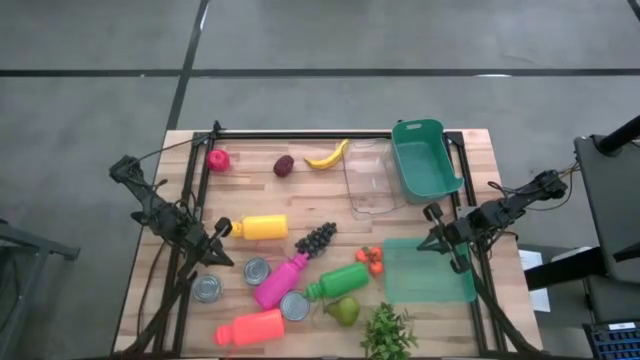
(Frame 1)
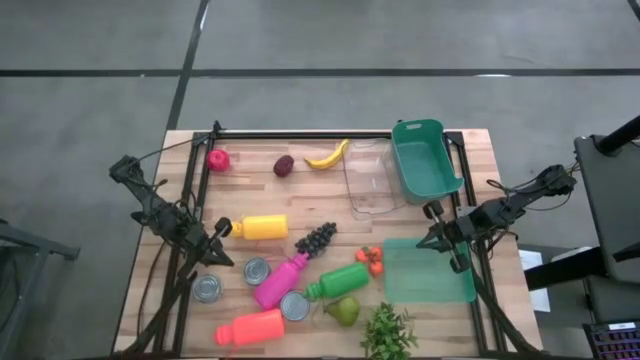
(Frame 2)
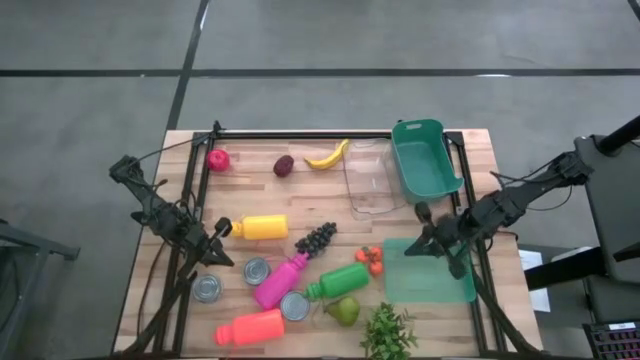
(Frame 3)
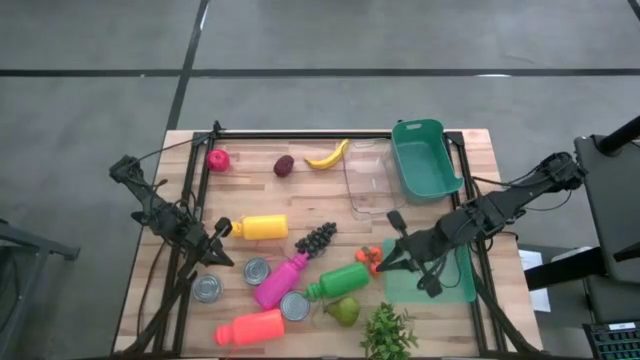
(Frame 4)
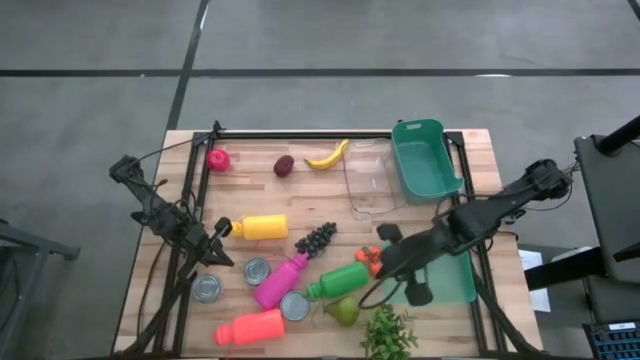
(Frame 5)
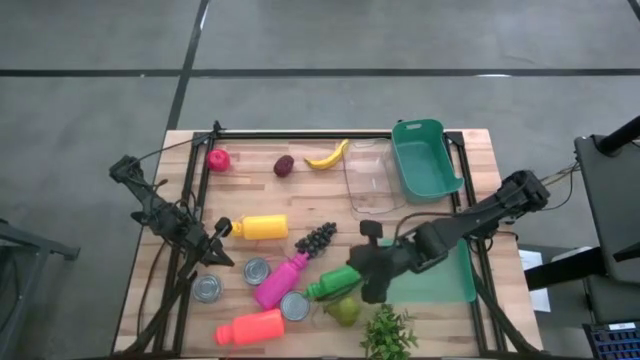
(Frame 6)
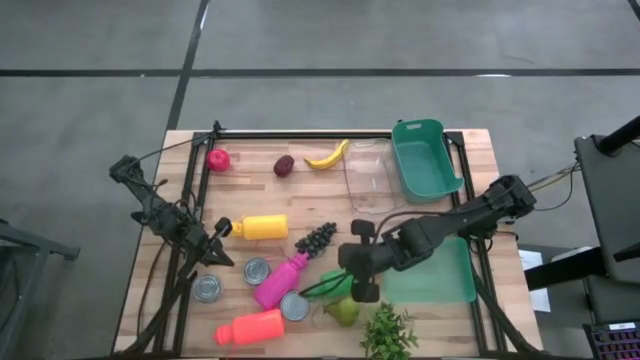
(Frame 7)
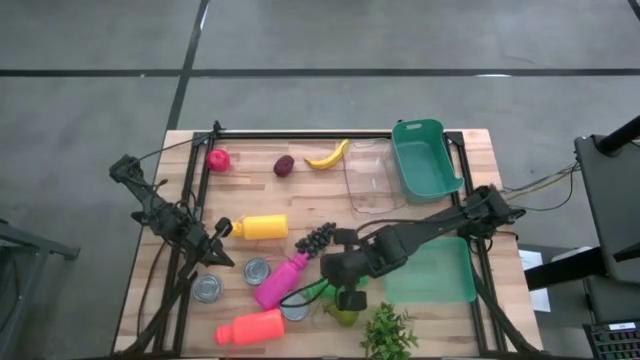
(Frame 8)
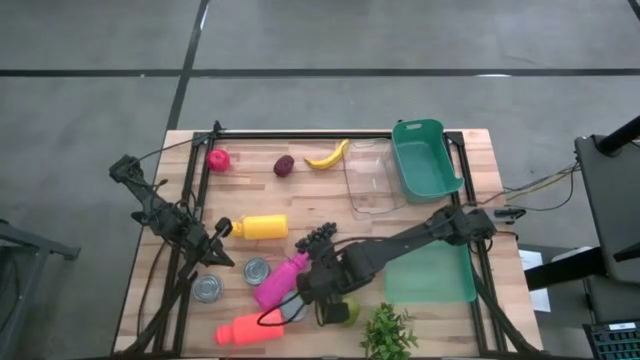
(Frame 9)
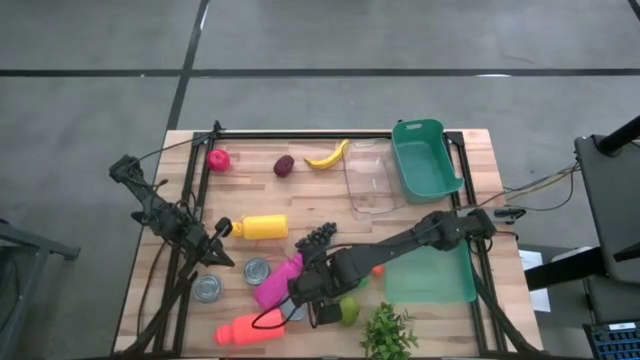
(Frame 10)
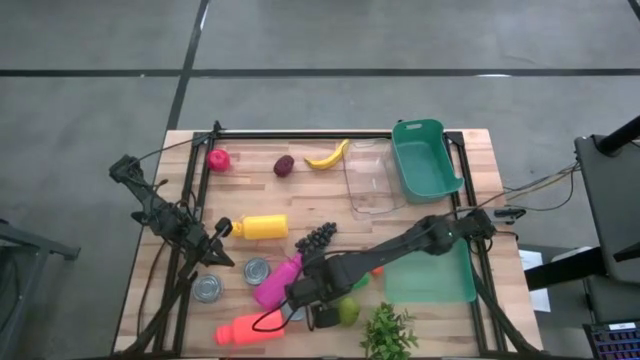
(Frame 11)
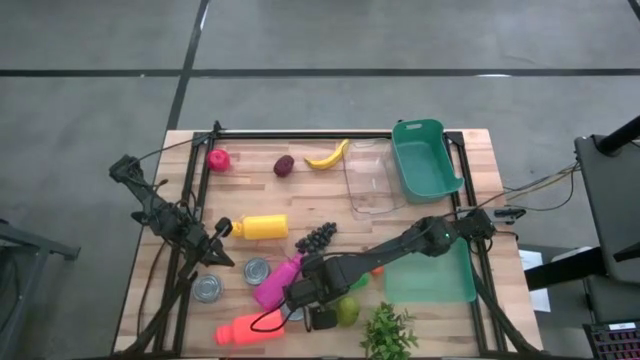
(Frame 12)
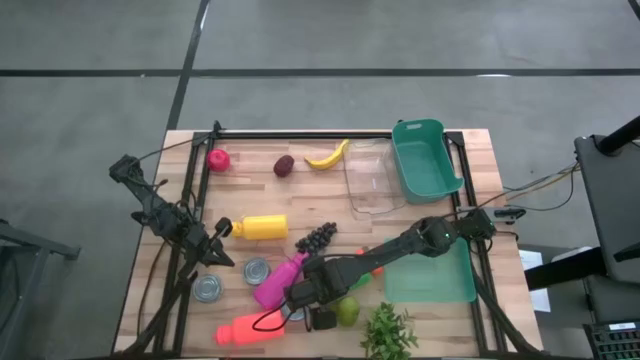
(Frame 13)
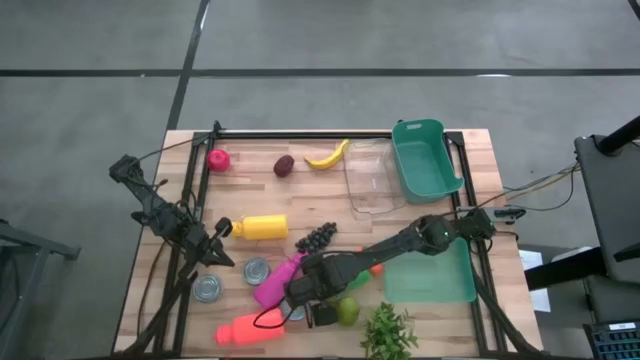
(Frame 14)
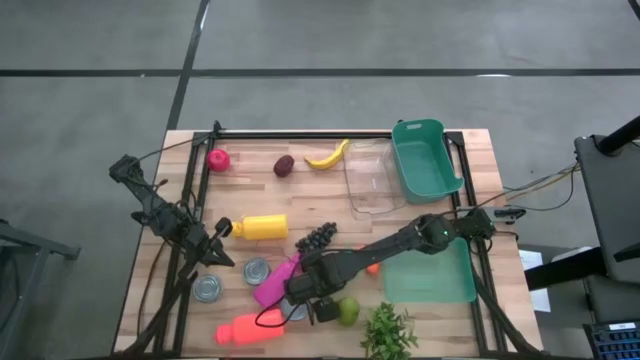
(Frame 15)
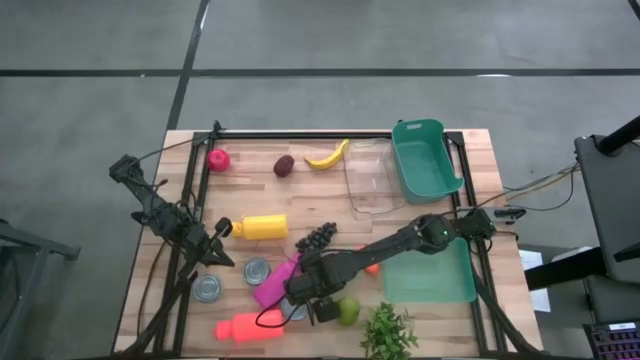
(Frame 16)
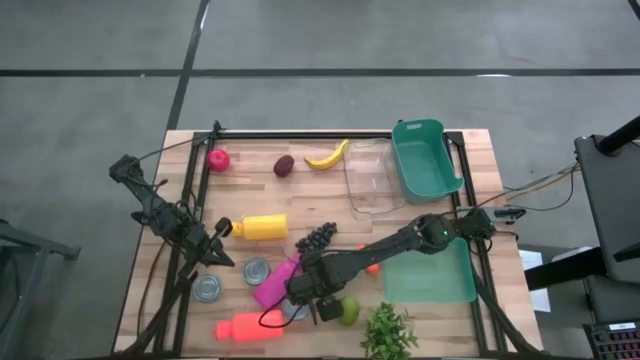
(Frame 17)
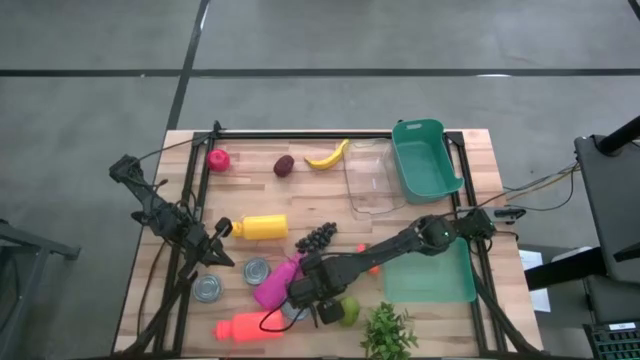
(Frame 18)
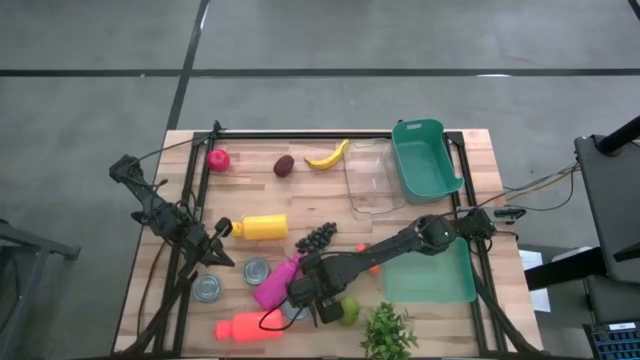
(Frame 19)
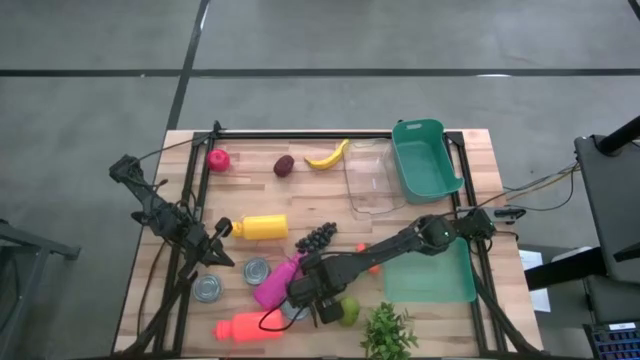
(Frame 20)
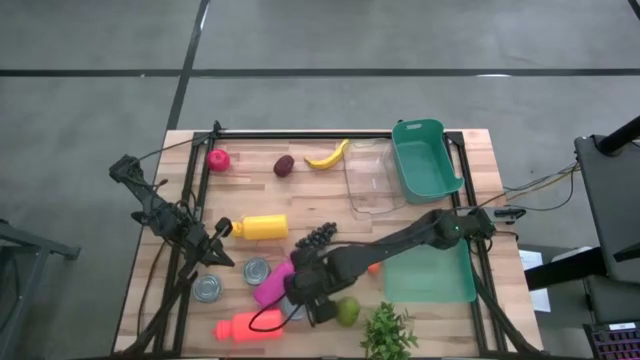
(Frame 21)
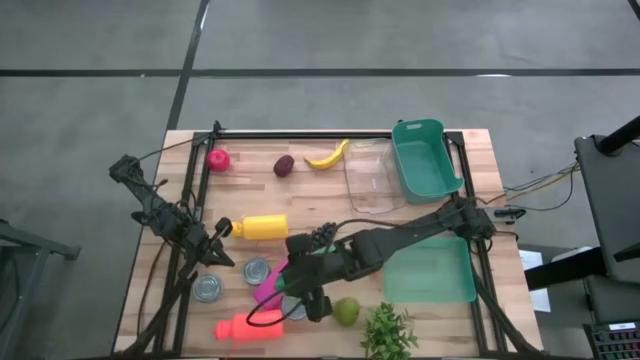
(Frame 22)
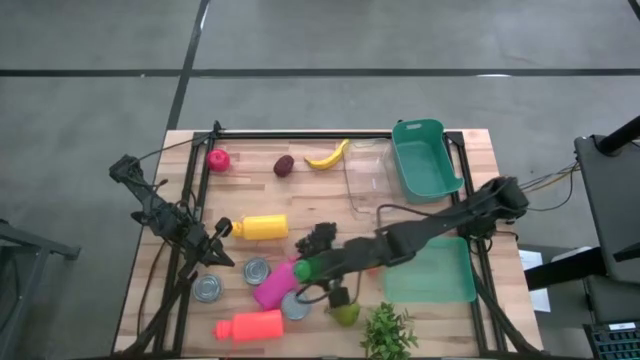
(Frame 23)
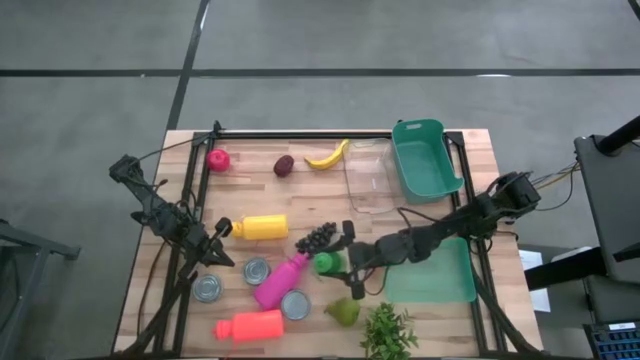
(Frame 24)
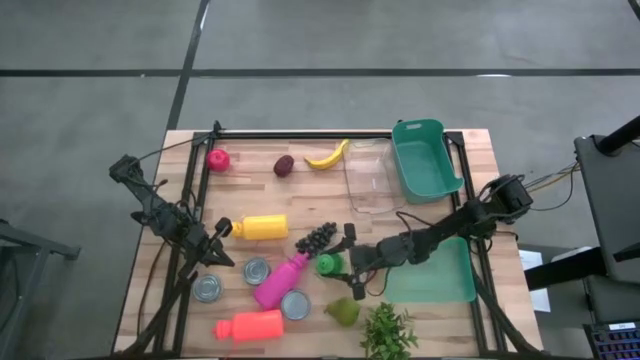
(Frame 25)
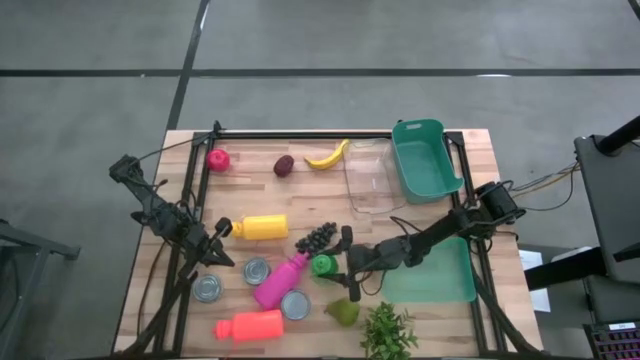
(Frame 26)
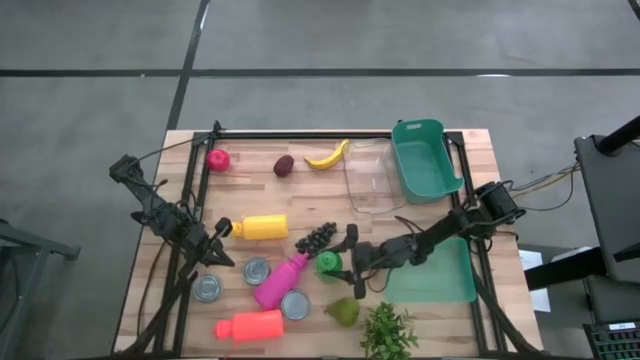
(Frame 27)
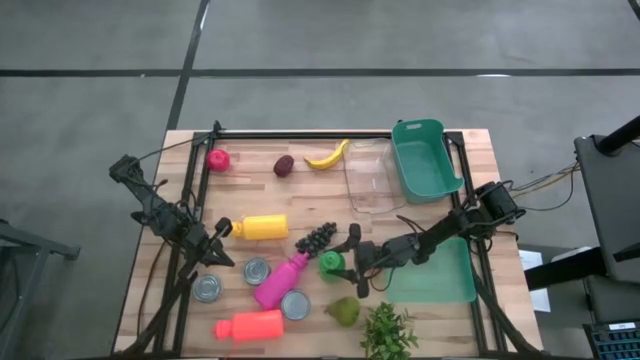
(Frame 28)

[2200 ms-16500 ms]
Task: Pick & Place Food Item
Put the green water bottle into the green bin

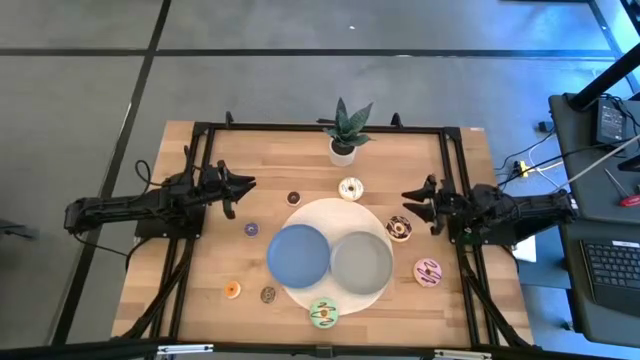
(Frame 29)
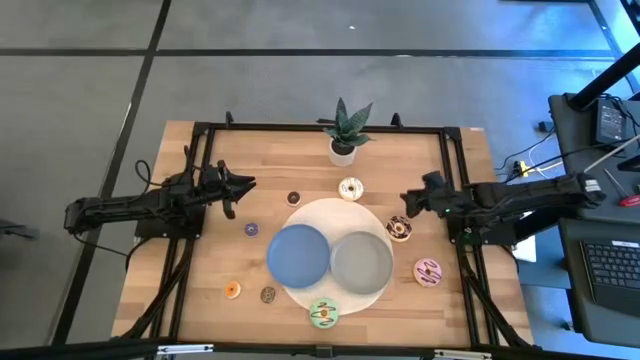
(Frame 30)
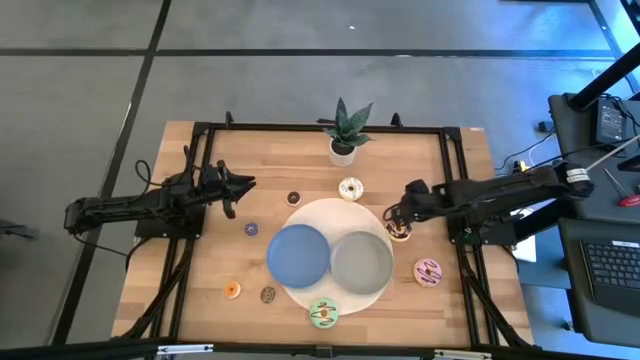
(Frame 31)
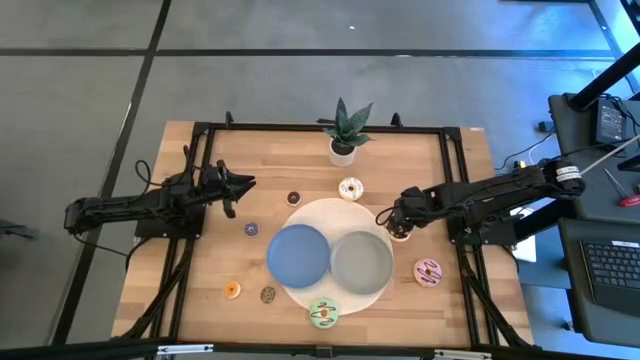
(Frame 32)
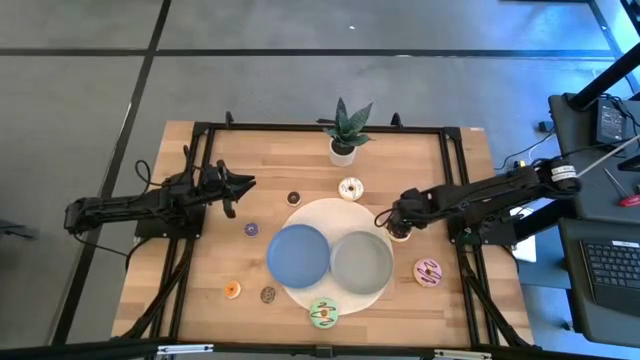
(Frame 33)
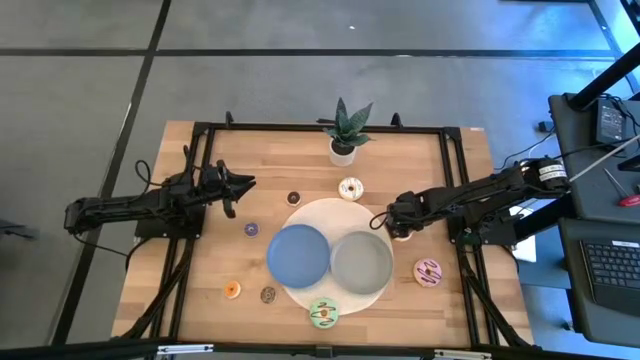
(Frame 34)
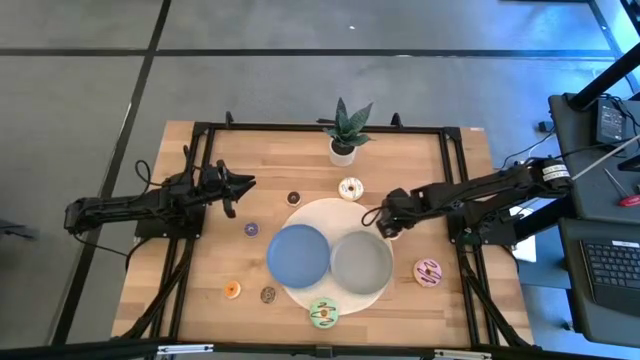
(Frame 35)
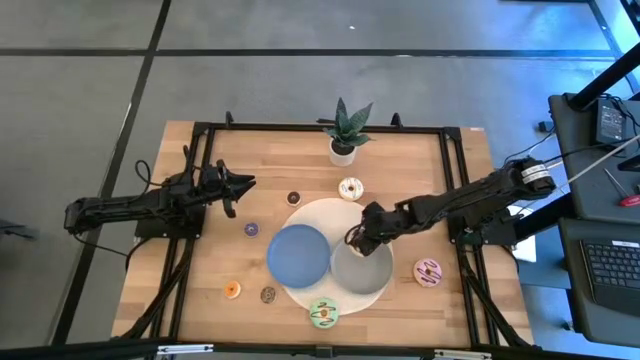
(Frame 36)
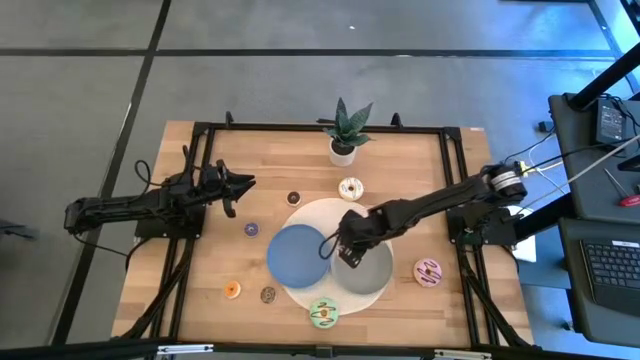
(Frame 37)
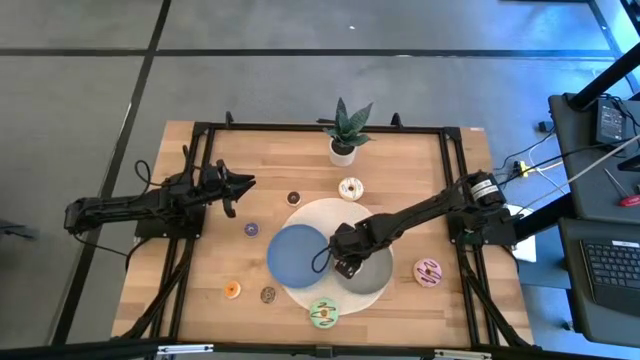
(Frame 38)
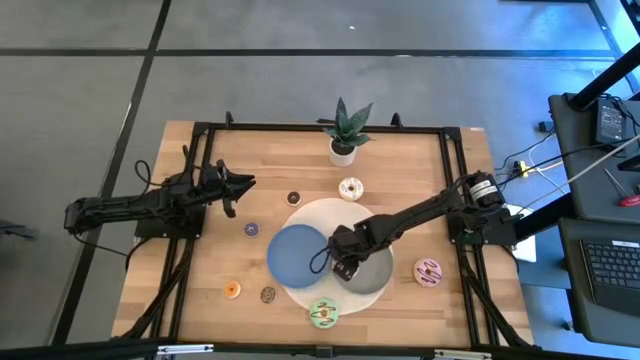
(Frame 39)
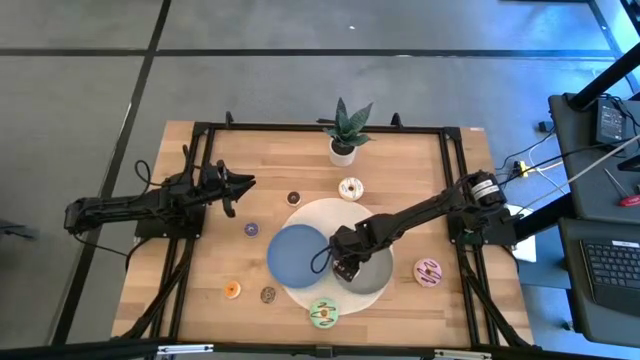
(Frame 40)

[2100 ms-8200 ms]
Task: Pick & Place donuts
Put the large black donut on the gray plate
